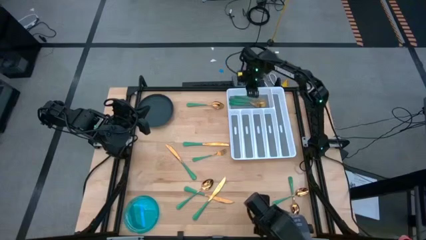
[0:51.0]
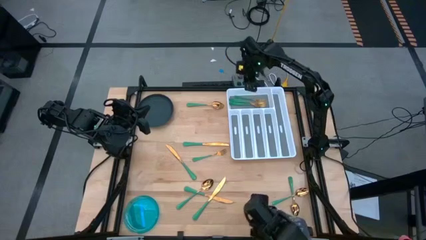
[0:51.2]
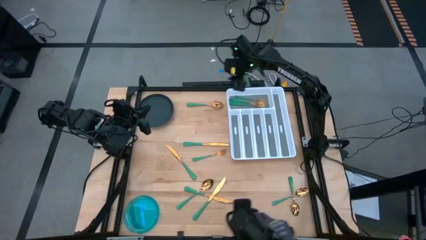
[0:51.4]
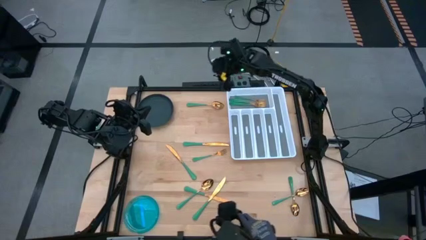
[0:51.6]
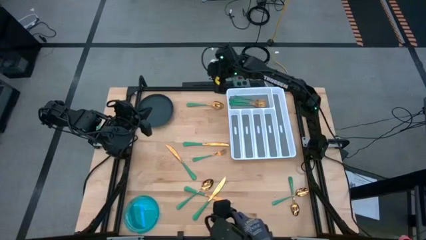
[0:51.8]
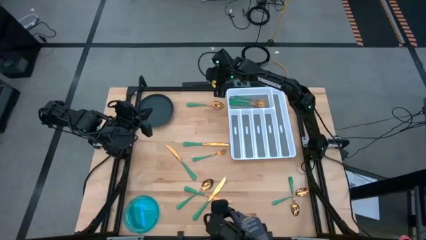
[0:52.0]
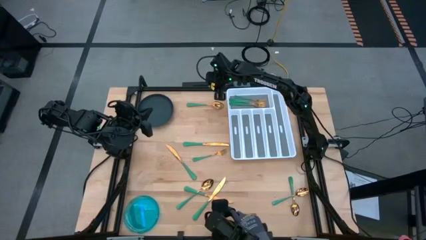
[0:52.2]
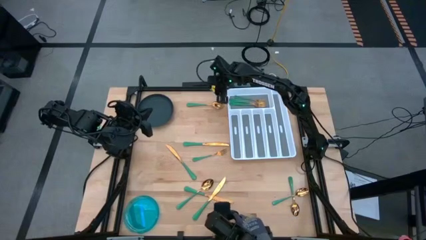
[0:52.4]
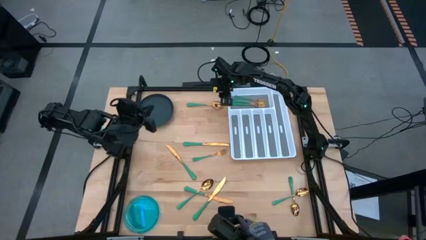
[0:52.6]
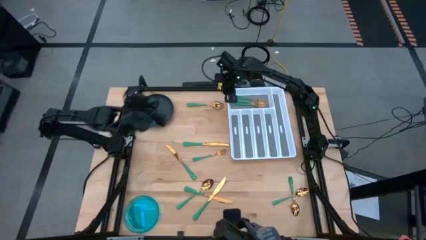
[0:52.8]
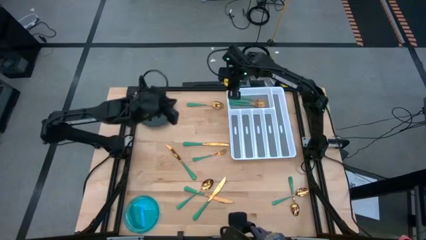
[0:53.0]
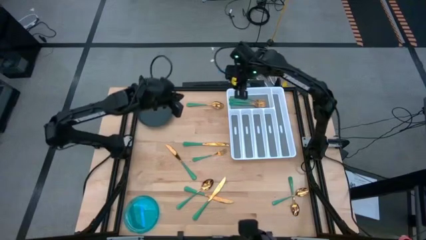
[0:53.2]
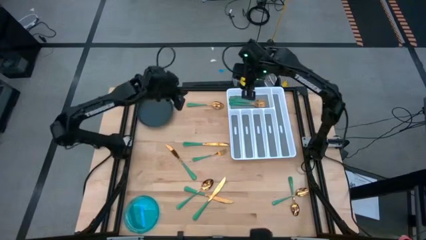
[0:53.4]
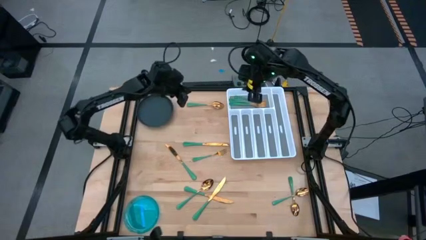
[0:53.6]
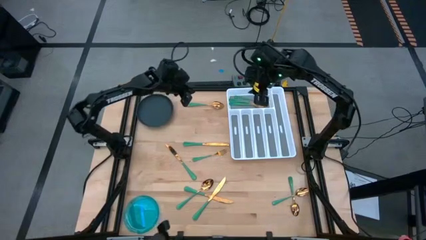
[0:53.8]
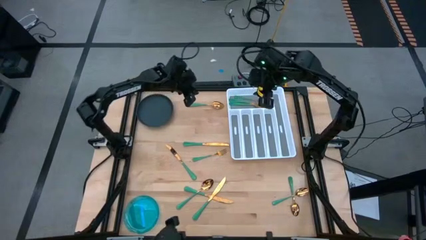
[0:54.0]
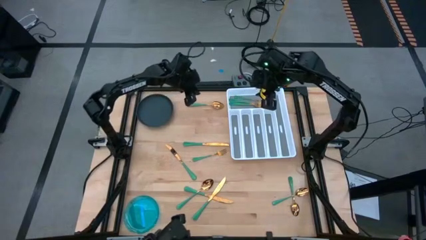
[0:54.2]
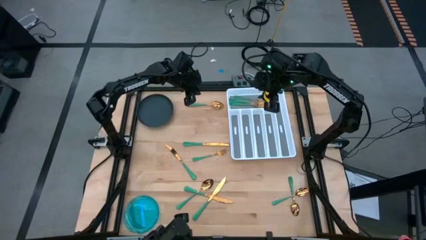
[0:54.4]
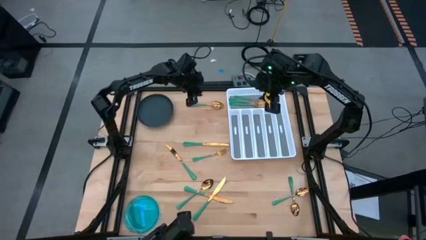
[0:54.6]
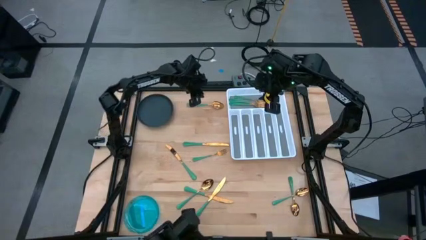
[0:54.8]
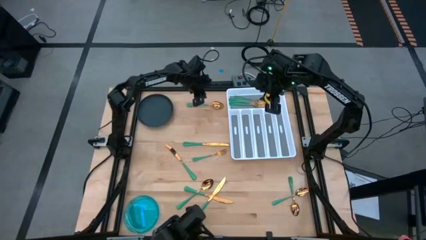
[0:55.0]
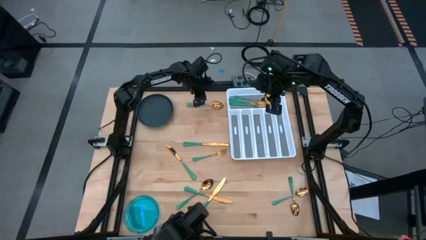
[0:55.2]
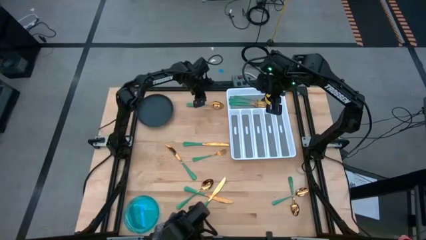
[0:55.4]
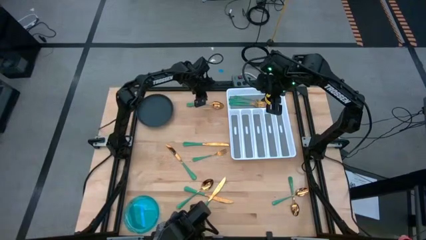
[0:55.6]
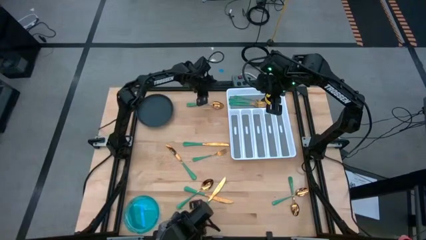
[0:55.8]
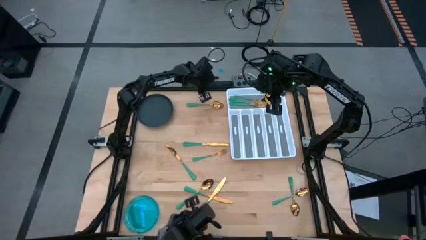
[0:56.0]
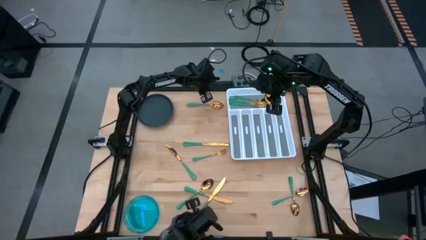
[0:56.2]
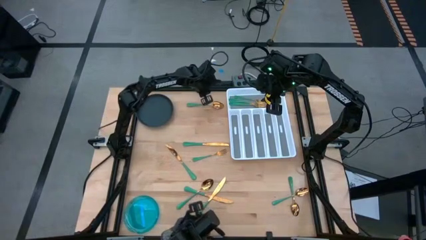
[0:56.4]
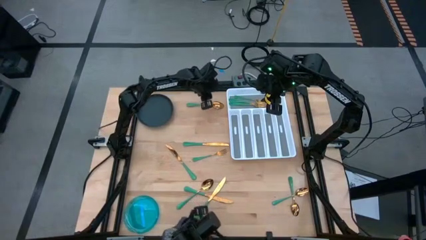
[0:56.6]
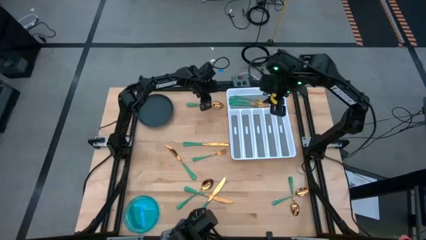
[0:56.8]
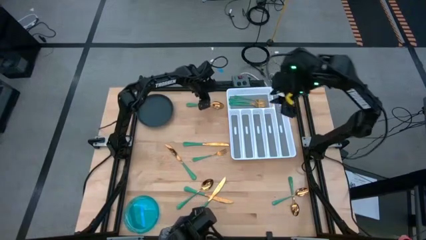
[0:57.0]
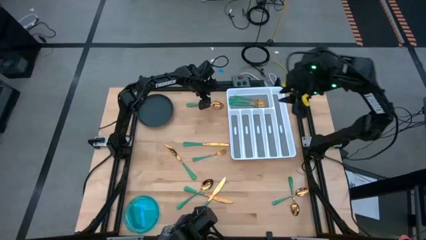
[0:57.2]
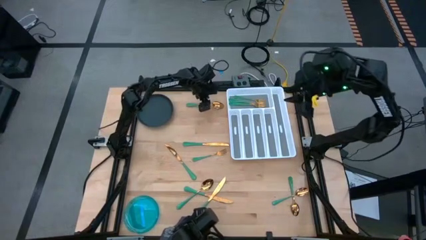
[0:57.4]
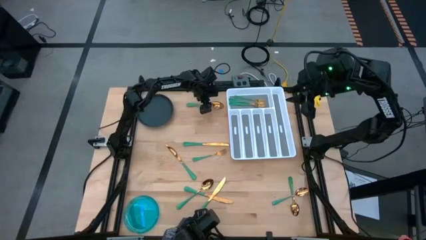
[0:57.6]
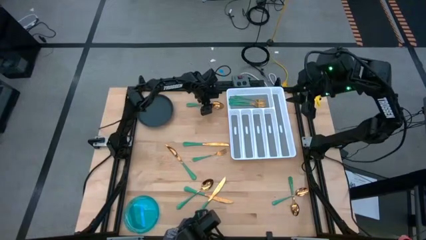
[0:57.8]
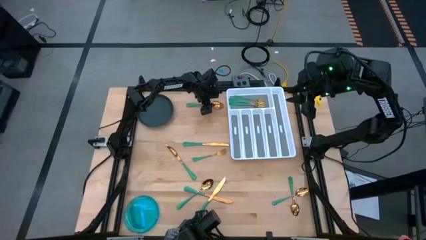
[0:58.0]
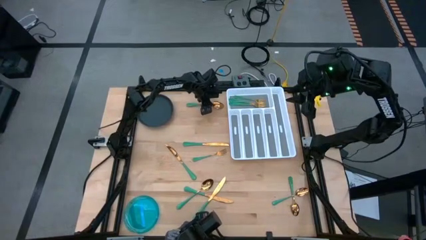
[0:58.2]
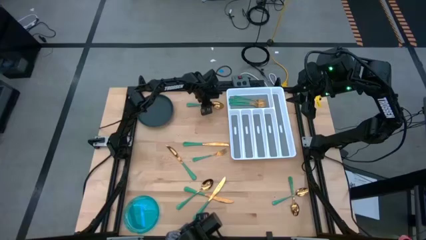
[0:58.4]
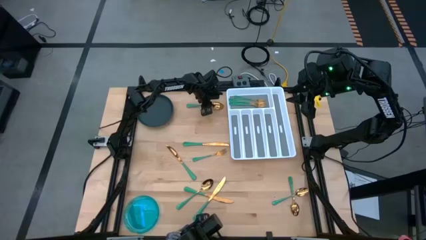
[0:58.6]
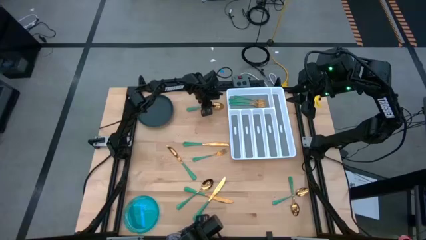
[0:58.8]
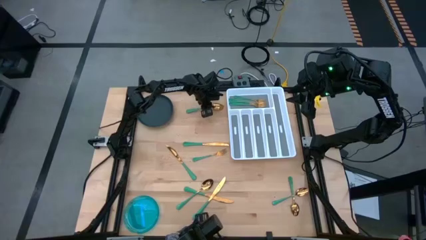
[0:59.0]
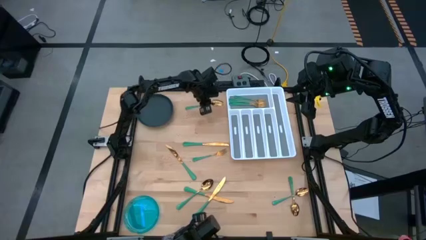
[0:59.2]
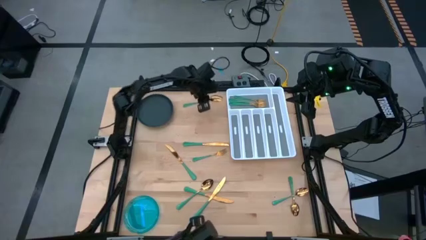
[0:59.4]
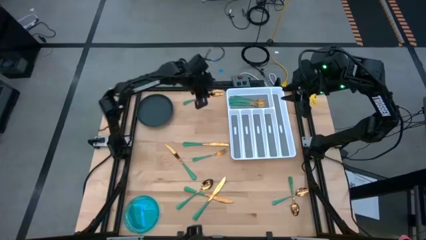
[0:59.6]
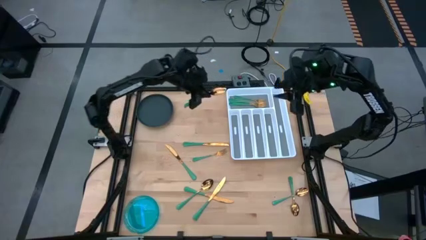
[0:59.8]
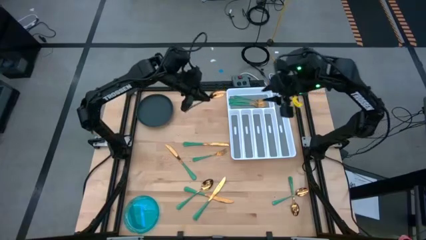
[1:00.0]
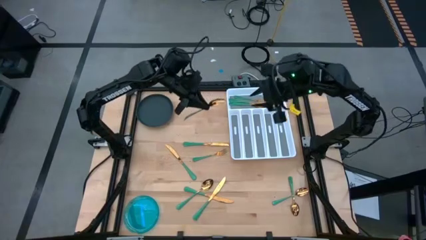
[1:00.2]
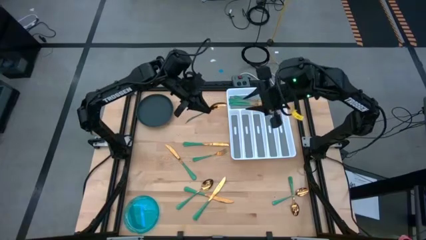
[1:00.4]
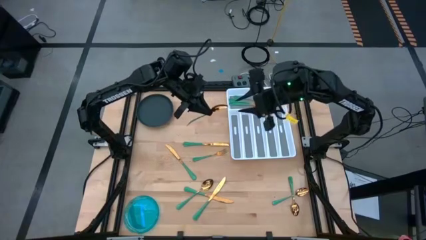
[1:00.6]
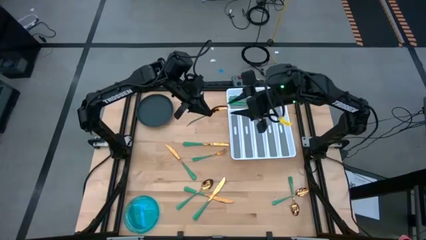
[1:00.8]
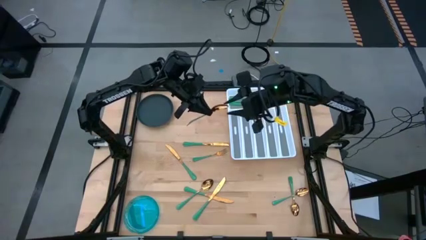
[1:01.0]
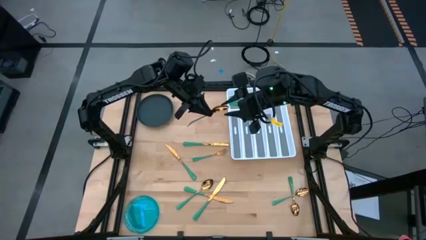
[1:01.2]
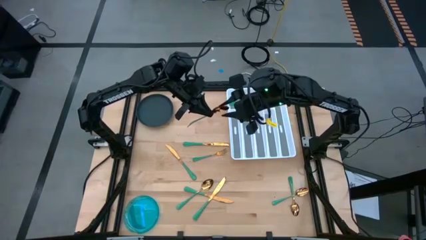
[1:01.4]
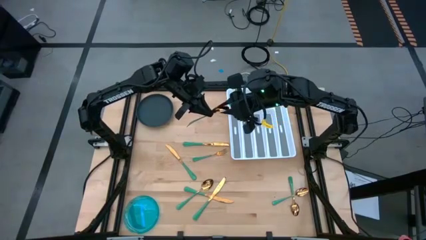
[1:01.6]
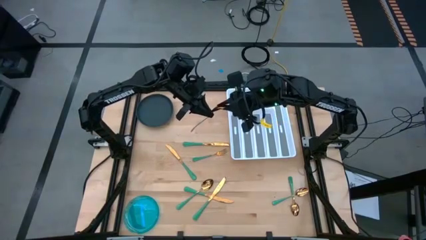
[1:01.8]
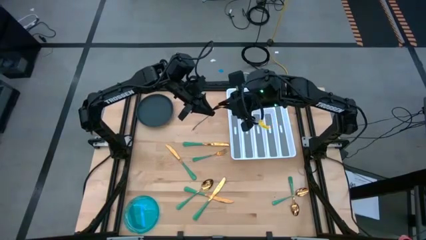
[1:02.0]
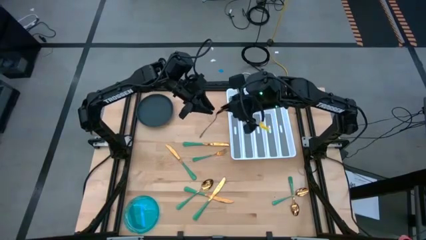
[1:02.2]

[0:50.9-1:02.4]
Task: Sort silverware
Put the green spoon into the silverware tray
